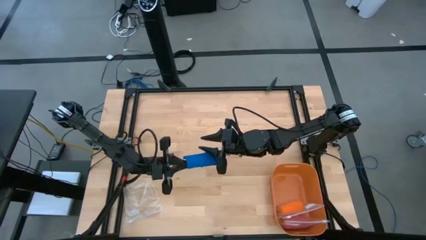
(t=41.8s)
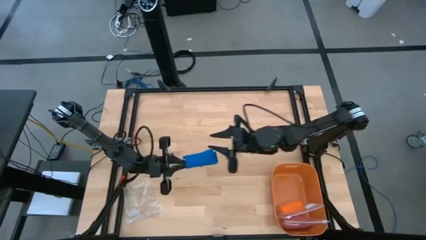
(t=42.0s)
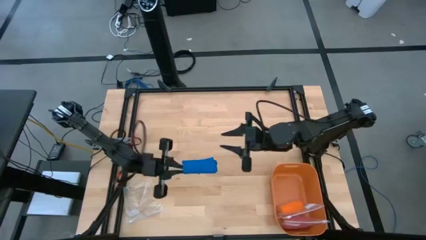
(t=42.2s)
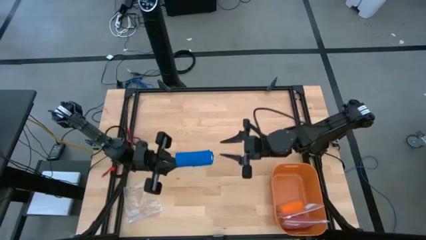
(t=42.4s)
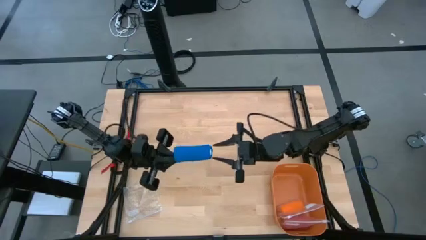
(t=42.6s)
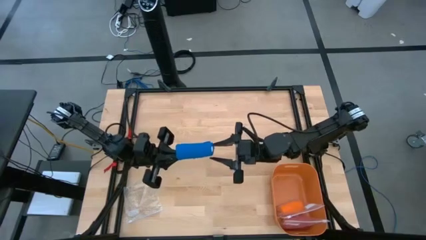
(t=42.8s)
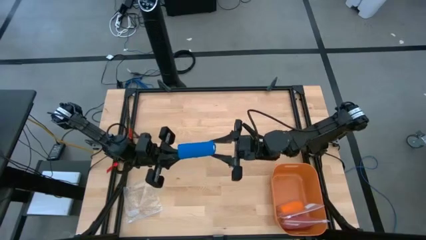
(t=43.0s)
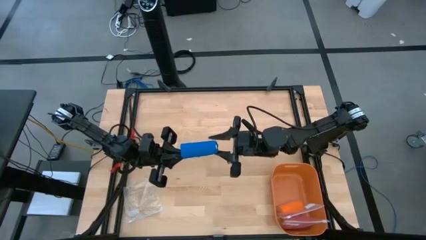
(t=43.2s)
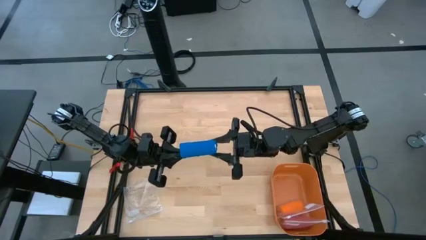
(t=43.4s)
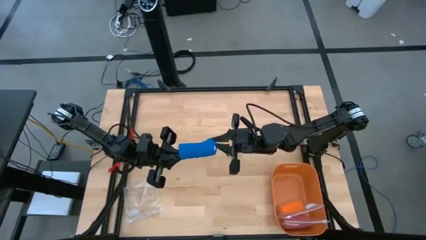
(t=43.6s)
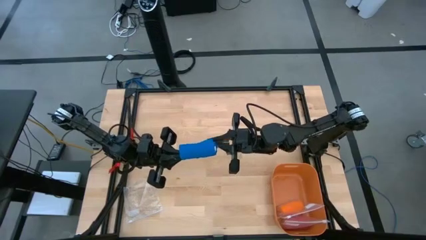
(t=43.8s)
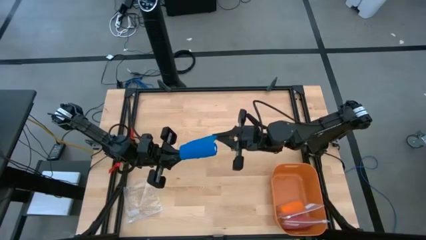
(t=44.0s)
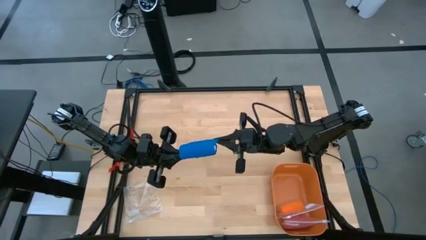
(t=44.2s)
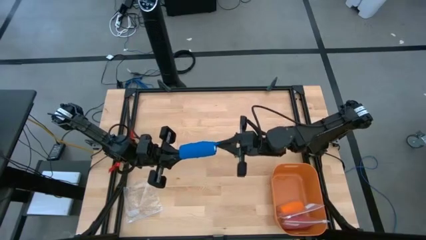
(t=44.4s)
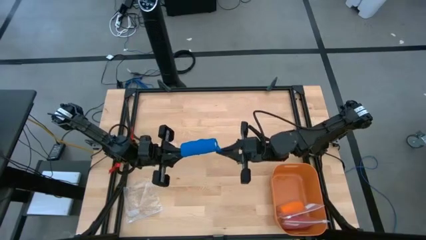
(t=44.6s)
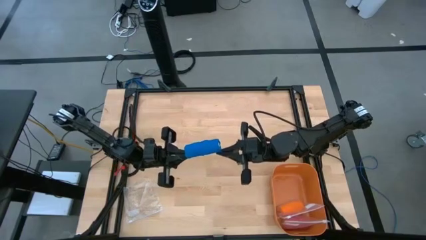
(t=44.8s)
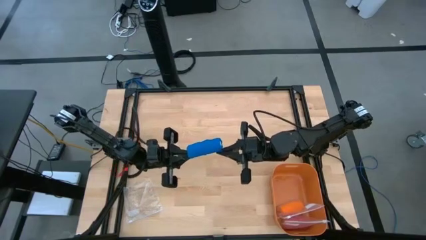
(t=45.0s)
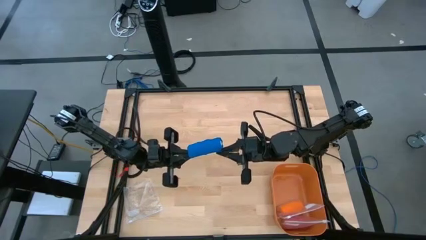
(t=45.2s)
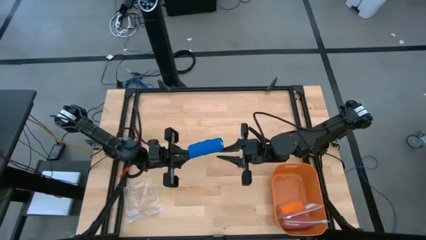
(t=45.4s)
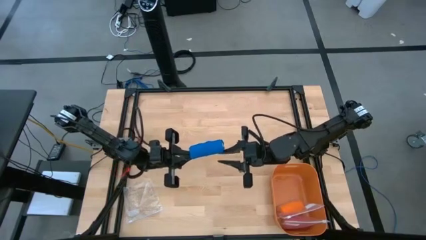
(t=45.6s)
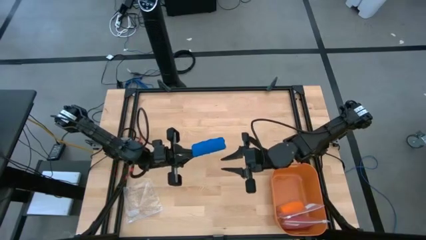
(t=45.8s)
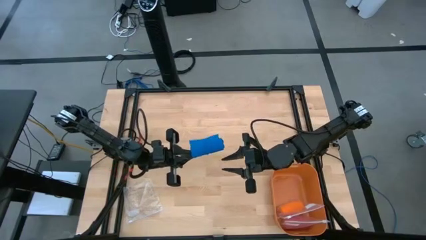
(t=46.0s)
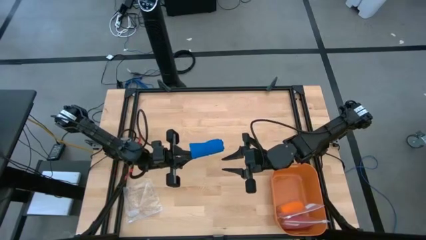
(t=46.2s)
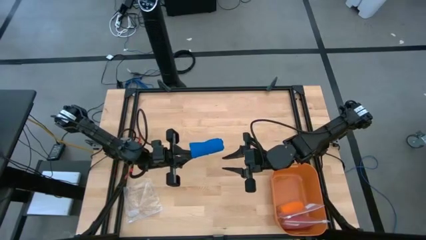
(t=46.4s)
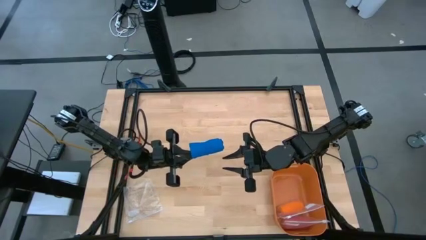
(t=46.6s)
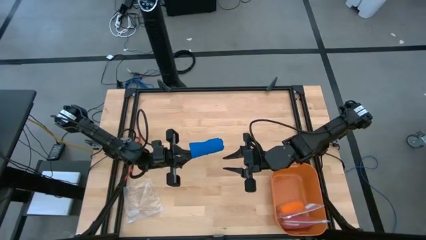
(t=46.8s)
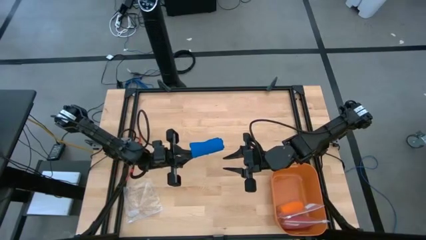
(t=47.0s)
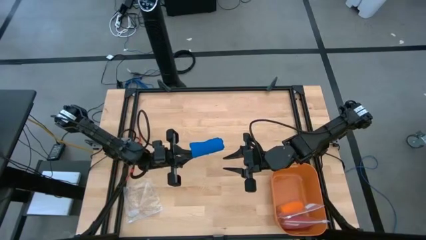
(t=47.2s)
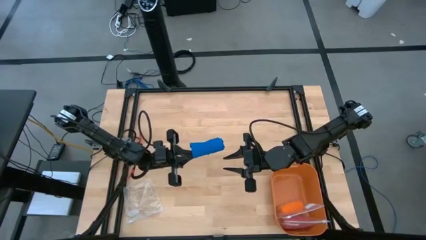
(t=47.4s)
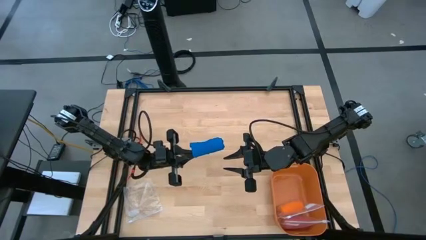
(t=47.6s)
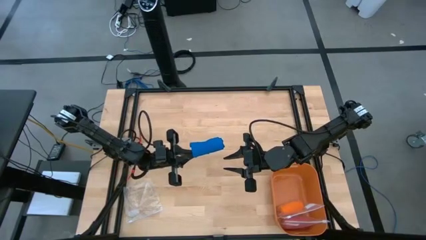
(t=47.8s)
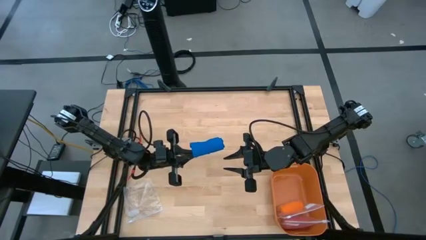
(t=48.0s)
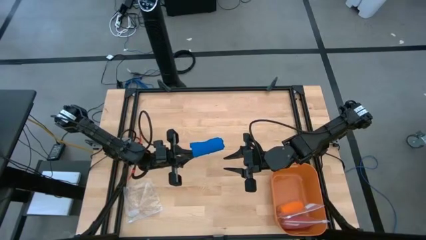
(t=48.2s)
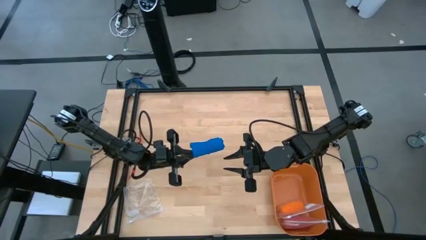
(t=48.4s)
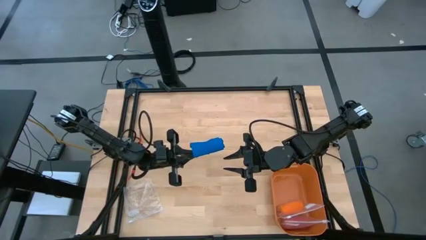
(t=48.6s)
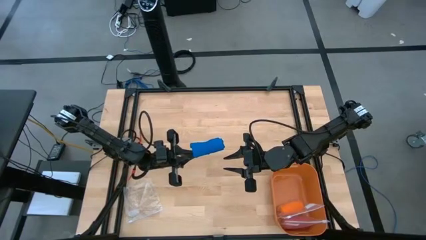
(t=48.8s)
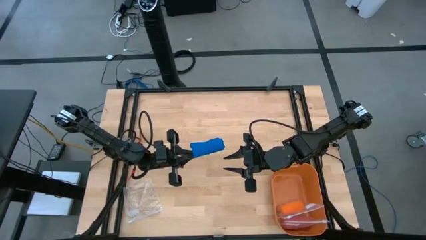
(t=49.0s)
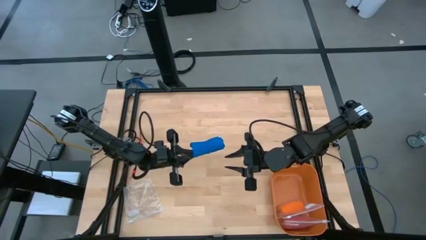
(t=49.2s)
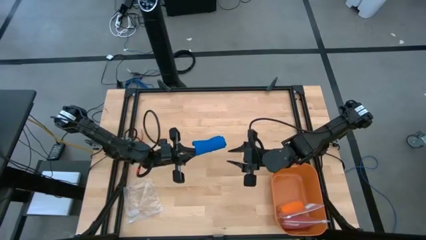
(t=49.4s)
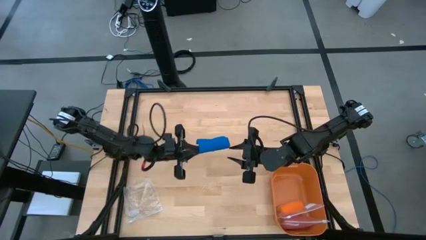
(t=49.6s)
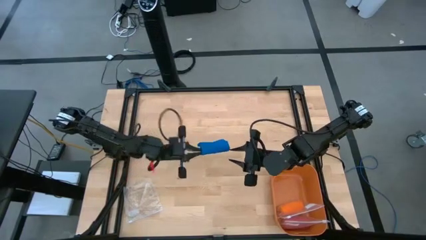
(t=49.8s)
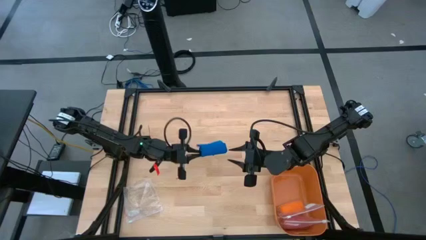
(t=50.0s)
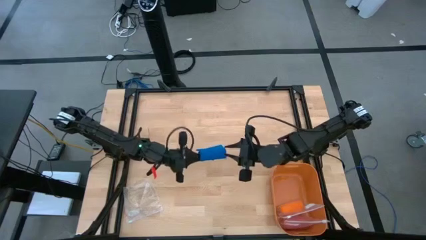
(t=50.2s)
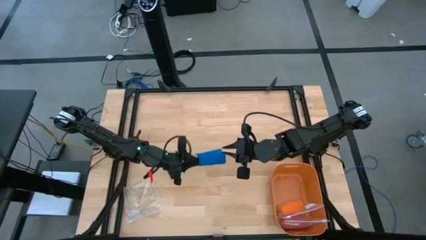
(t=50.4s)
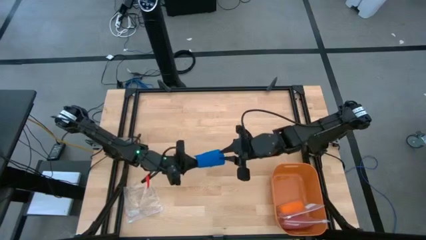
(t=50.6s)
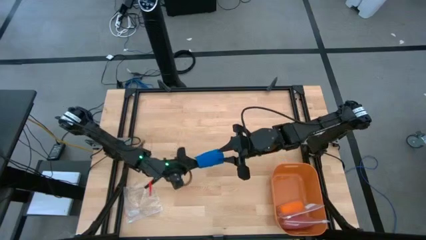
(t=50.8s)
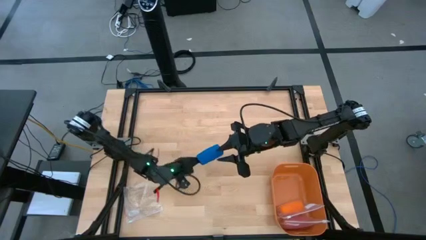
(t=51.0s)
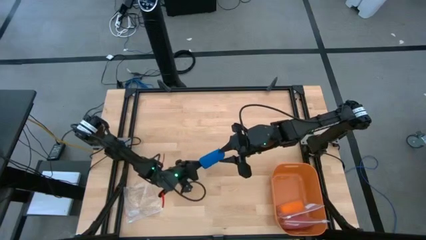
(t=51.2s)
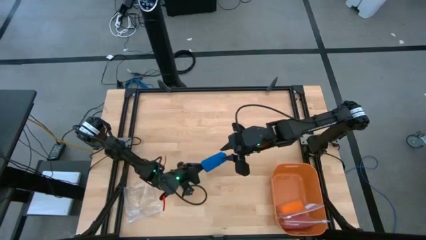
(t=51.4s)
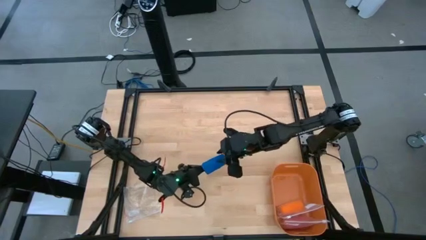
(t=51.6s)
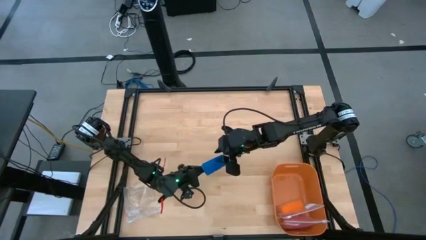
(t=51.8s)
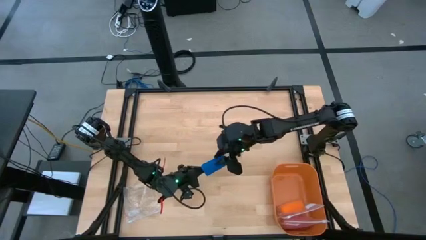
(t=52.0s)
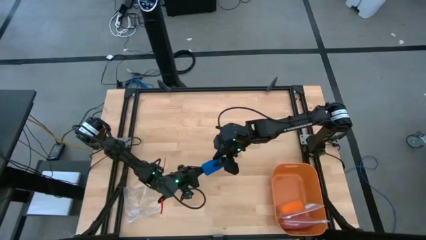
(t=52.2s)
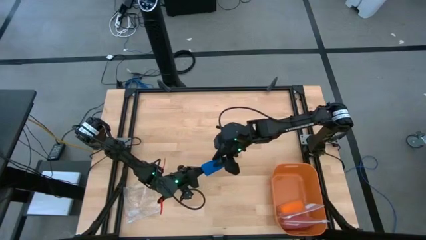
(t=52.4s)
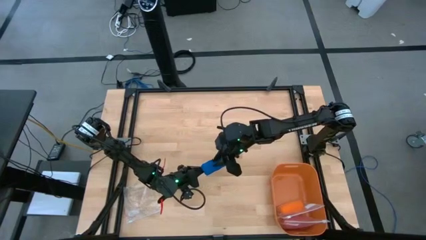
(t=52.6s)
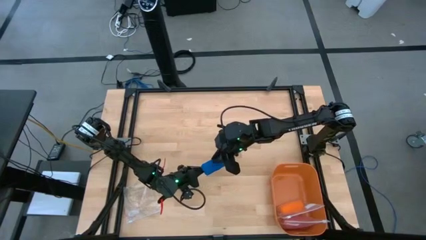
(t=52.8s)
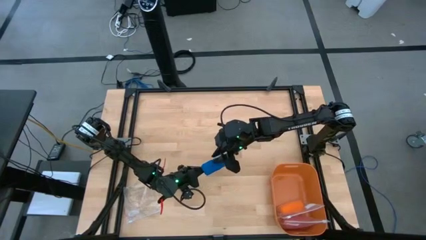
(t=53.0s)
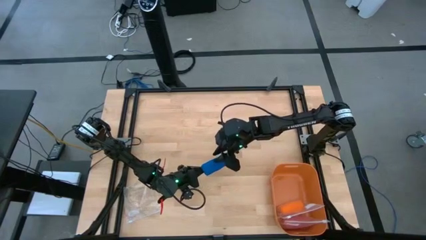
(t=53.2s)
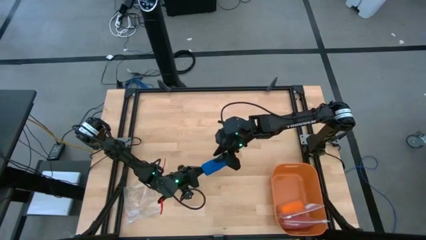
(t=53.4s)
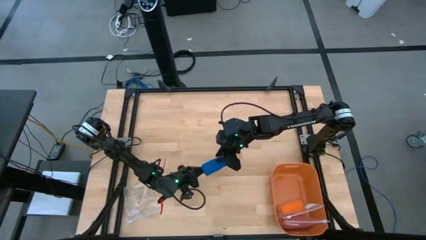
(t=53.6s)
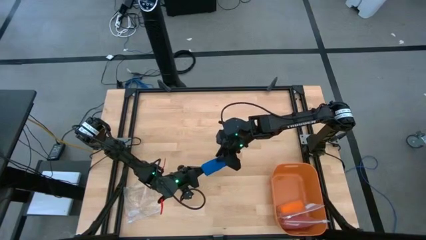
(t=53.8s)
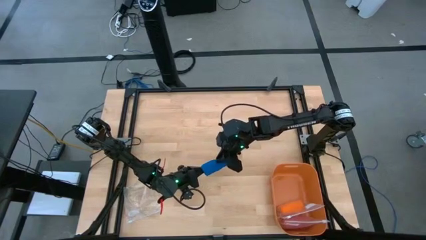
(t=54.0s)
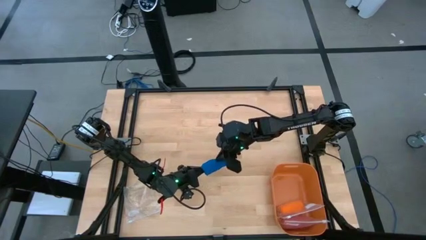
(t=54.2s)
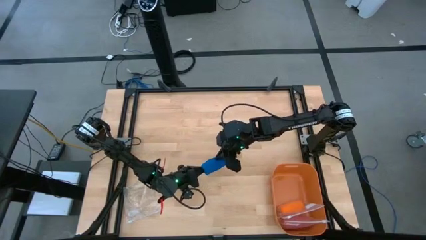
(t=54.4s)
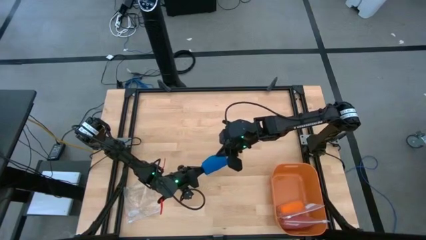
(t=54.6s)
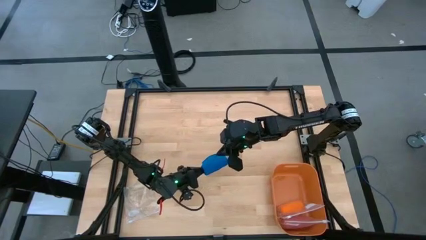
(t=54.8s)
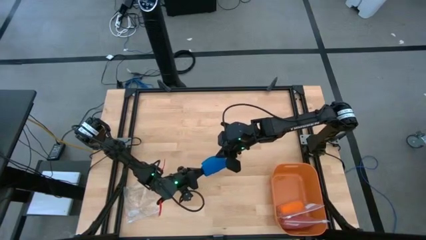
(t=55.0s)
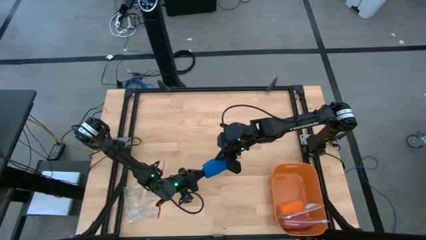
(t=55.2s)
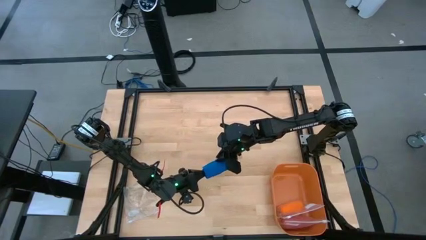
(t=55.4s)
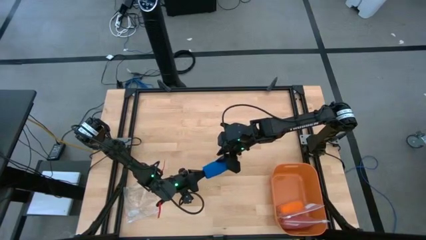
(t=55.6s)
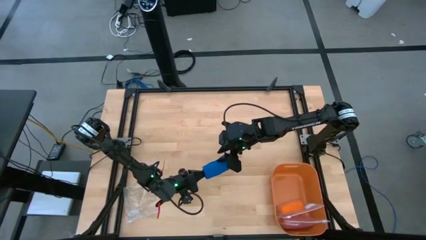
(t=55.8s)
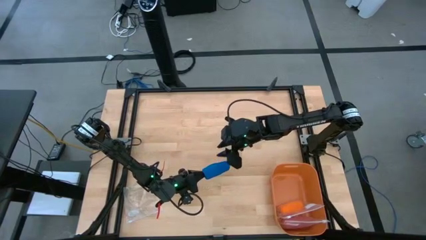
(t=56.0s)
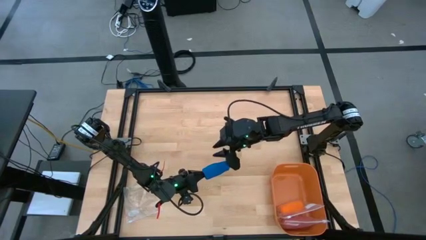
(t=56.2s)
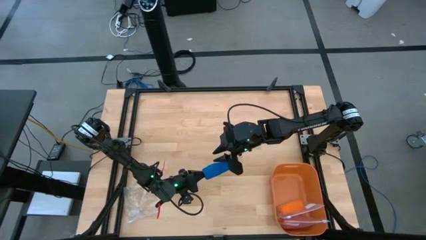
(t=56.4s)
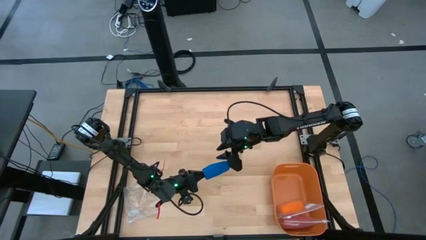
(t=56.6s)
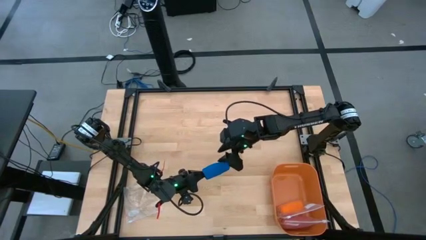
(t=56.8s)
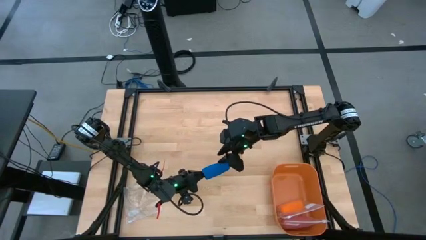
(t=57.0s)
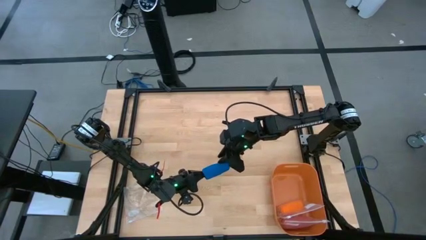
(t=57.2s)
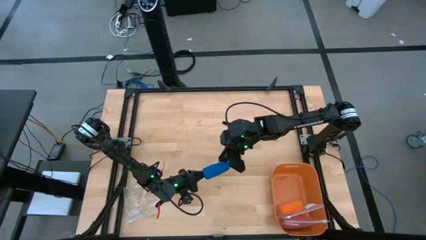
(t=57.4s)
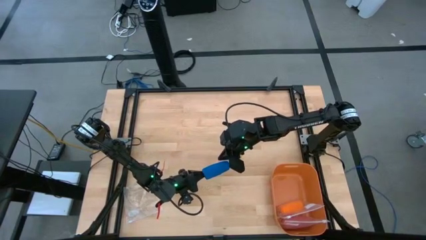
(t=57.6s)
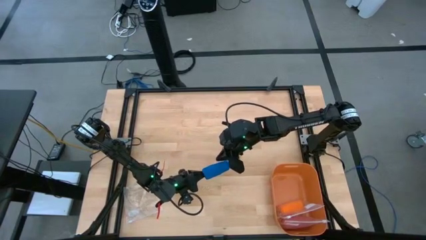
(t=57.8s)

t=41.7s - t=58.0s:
Task: Roll bandage
Roll the blue bandage
